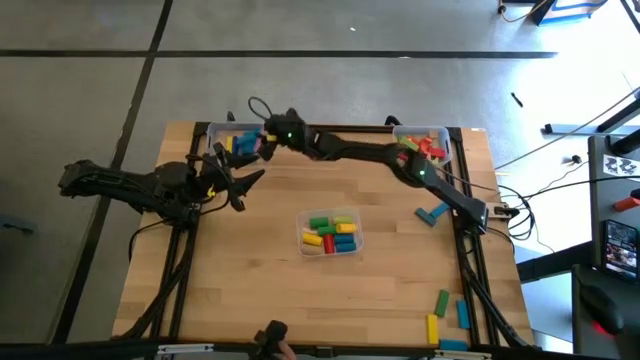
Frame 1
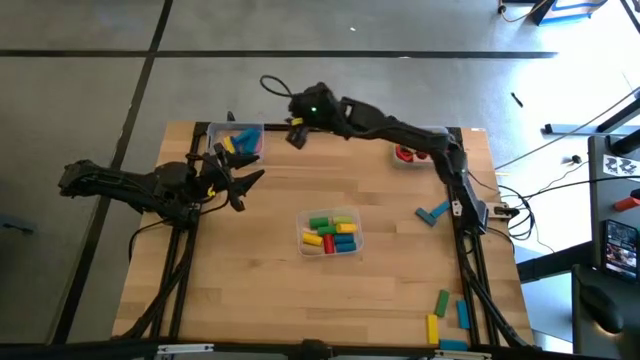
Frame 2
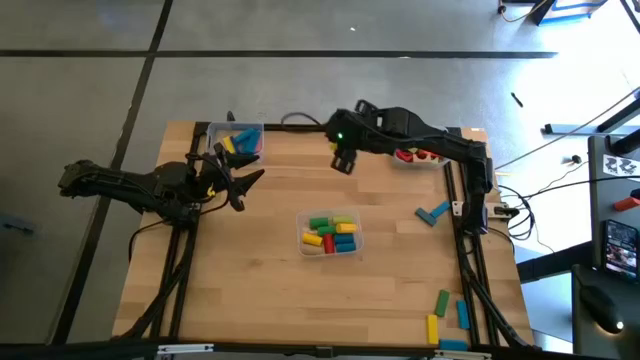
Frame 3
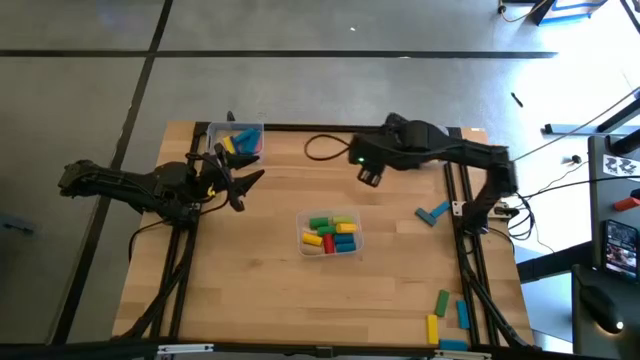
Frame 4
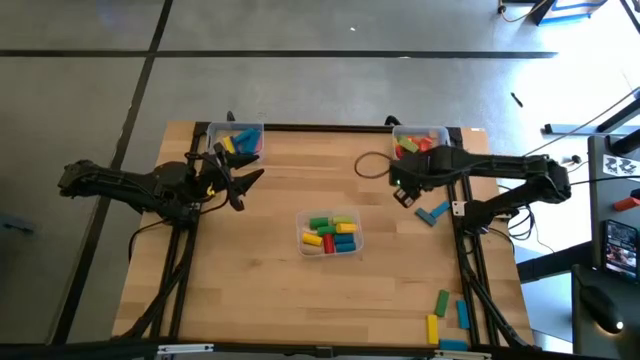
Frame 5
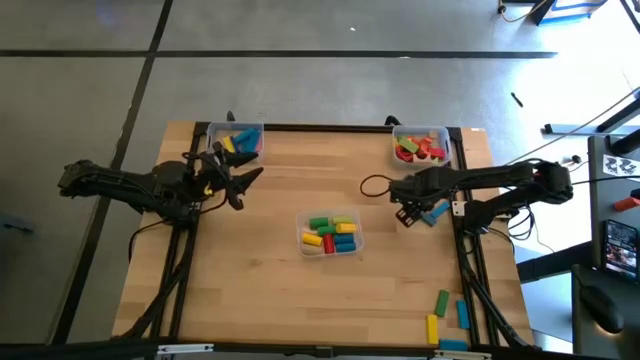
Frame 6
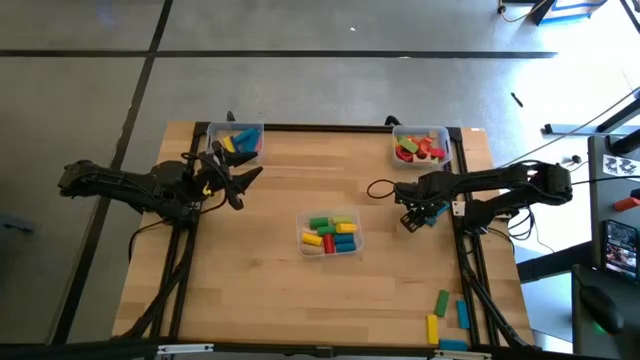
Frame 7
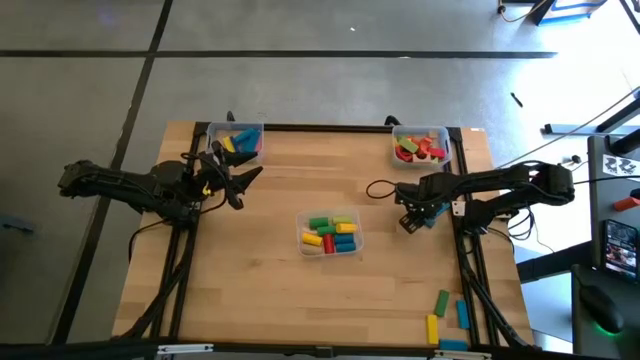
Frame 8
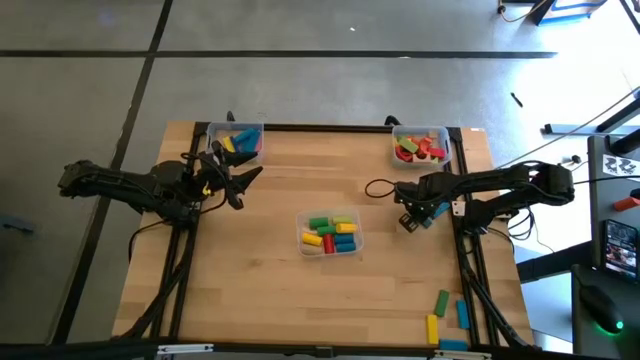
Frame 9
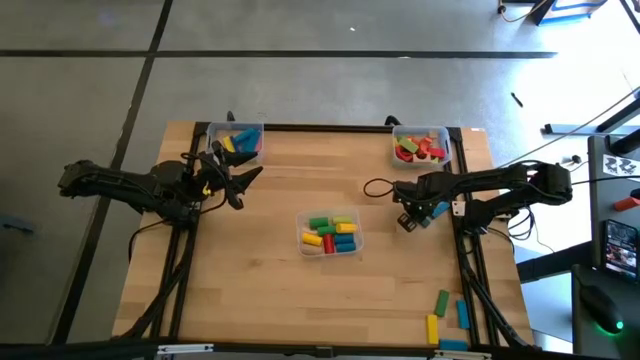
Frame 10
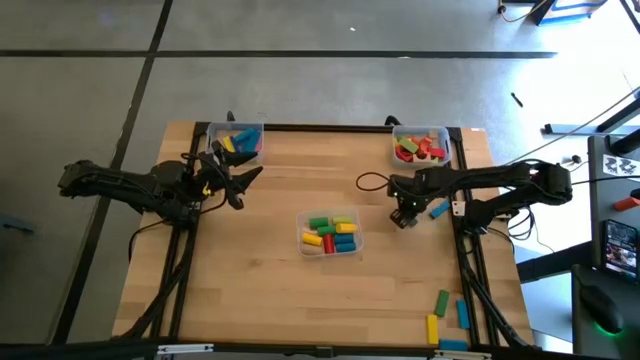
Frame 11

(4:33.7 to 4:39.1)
Task: Sort blocks by size
Put the blue rectangular block into the top left transparent bin

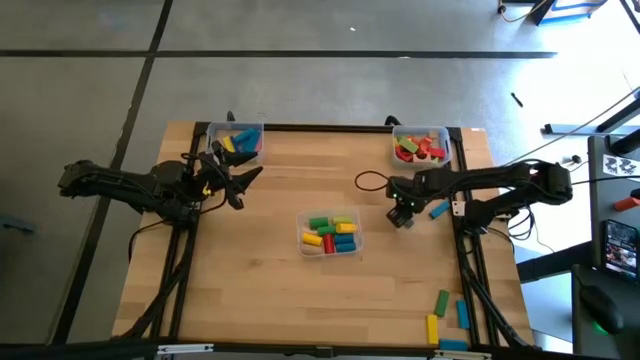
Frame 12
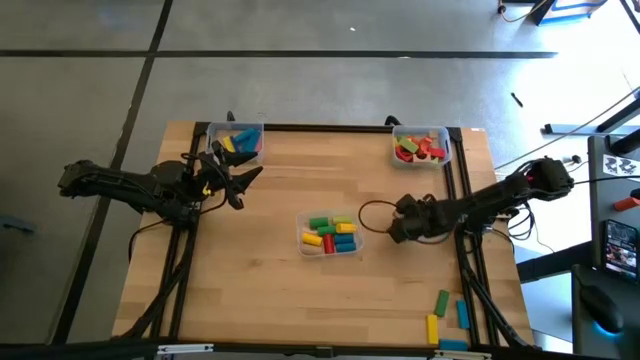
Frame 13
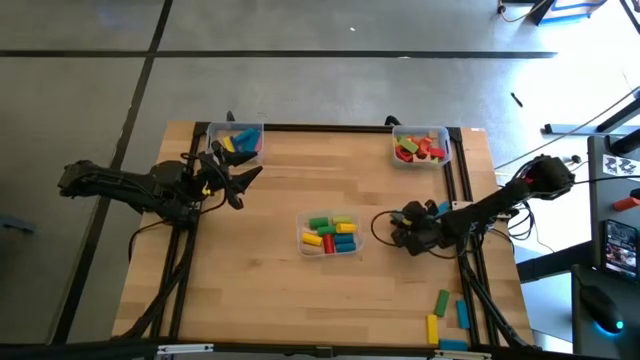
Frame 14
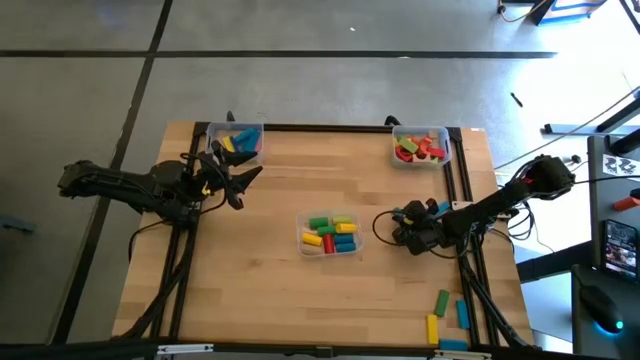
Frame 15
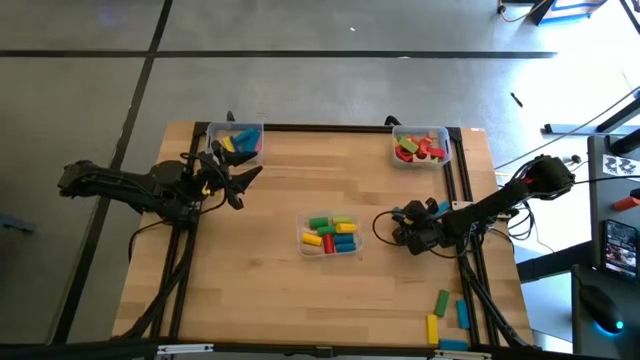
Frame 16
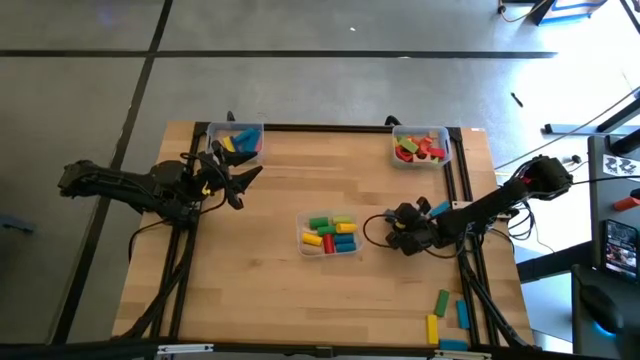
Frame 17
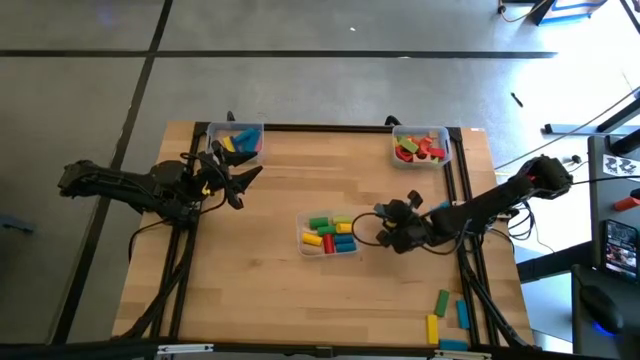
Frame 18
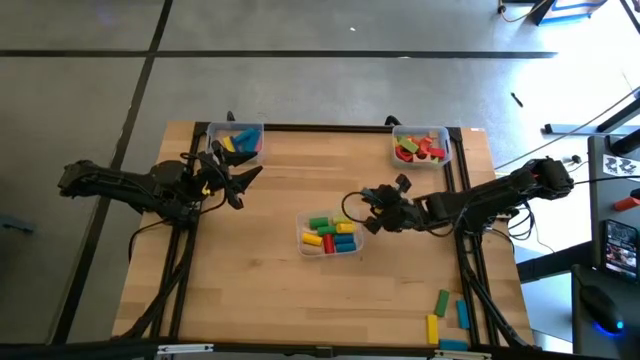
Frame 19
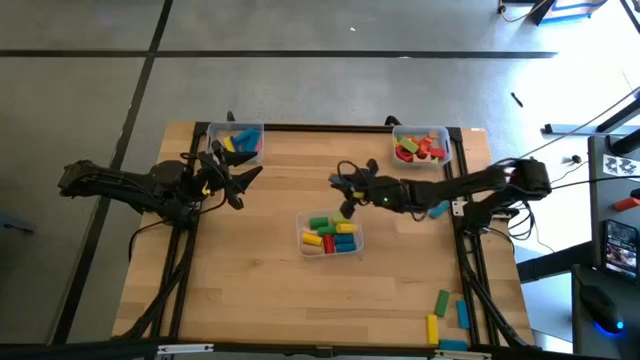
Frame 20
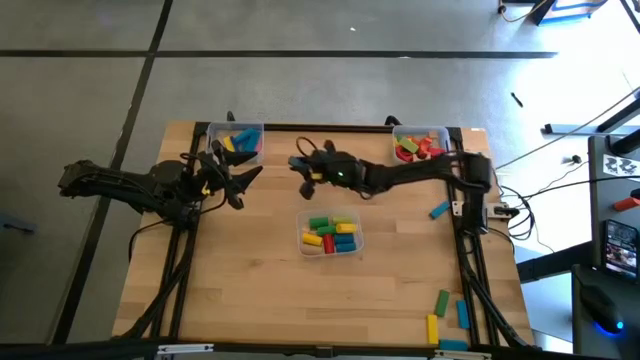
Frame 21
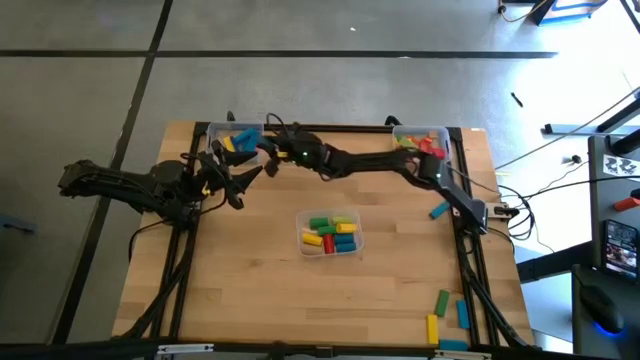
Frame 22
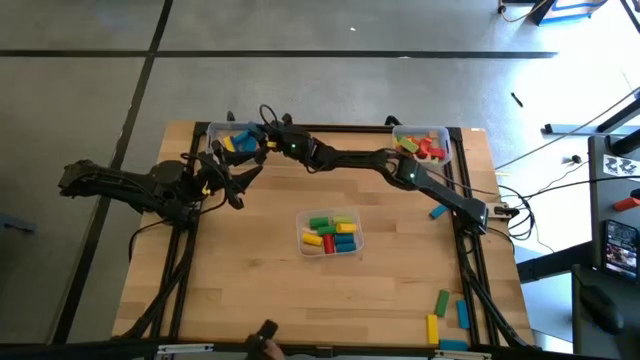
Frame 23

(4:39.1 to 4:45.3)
Put the blue rectangular block into the top left transparent bin

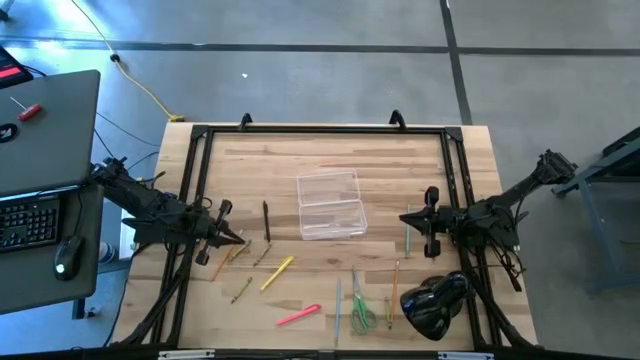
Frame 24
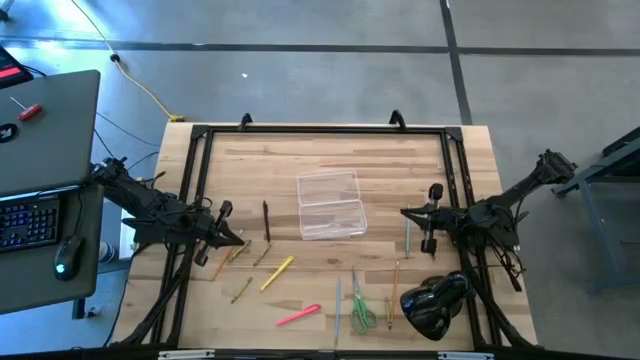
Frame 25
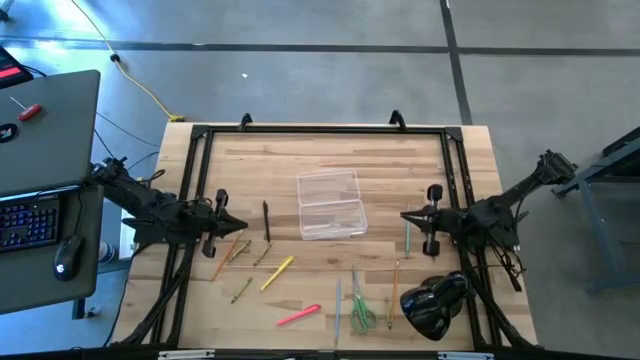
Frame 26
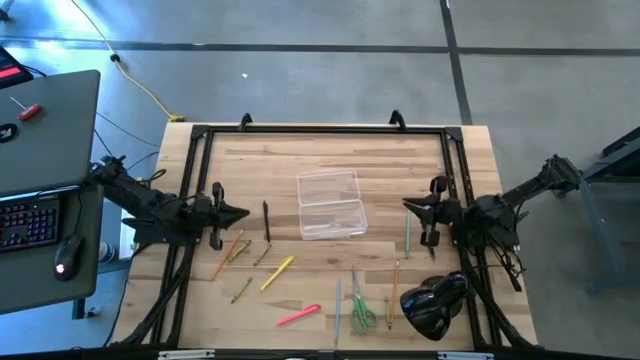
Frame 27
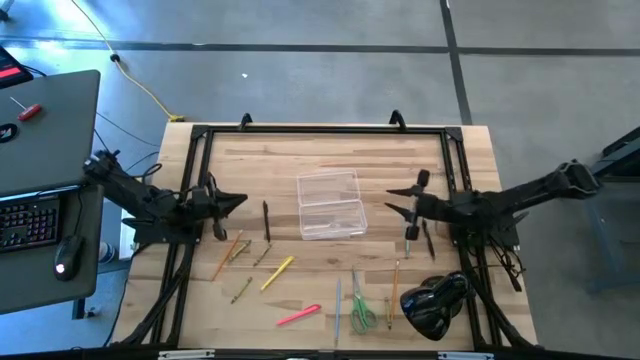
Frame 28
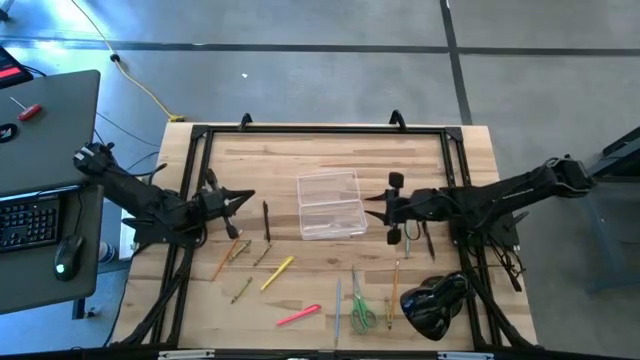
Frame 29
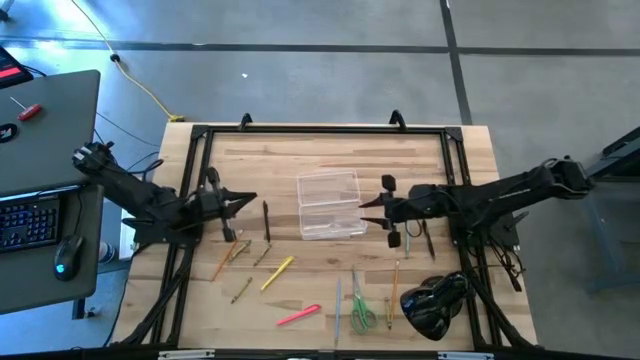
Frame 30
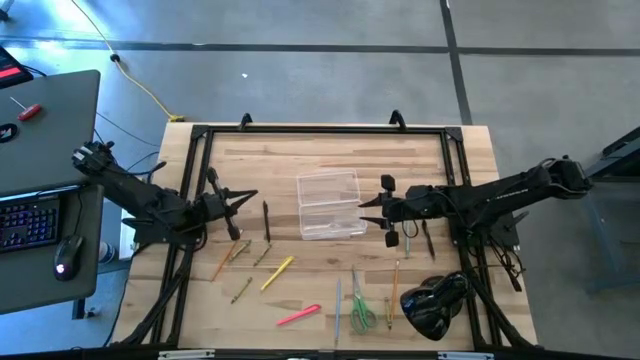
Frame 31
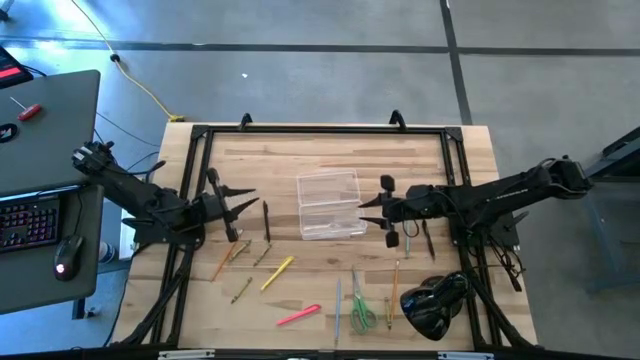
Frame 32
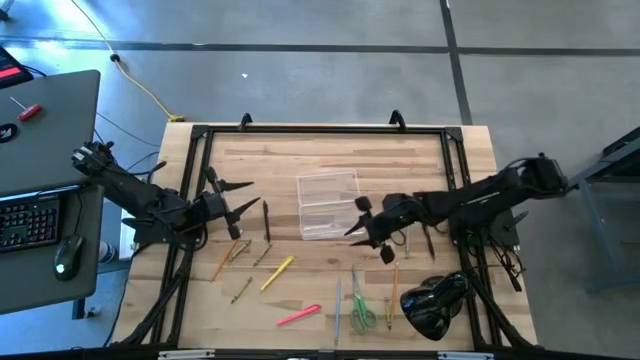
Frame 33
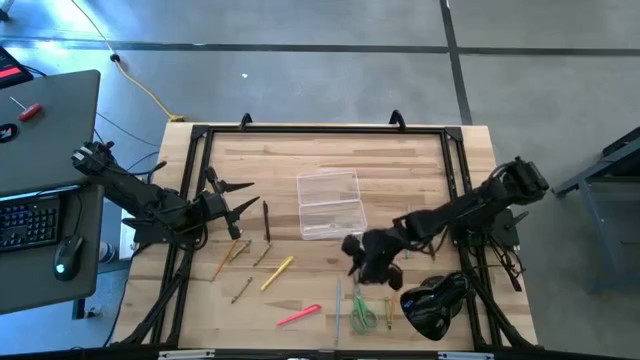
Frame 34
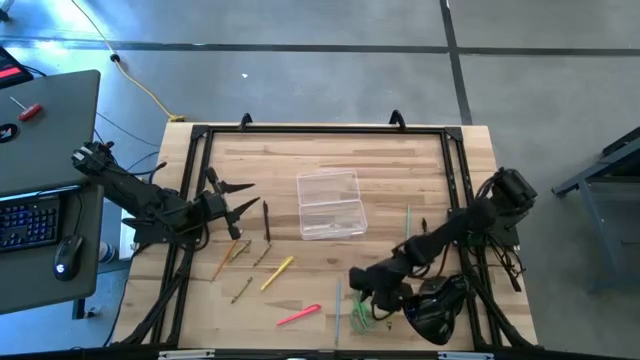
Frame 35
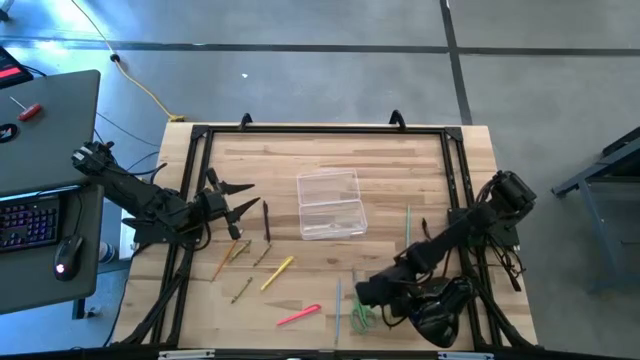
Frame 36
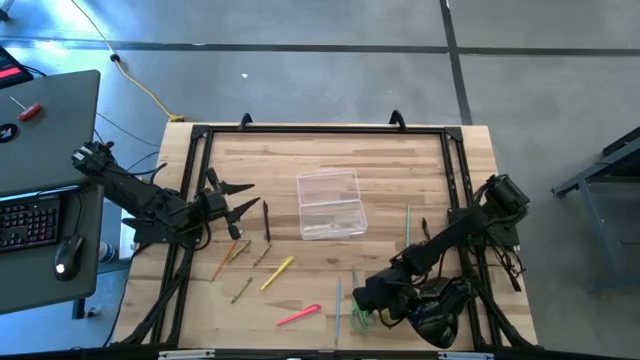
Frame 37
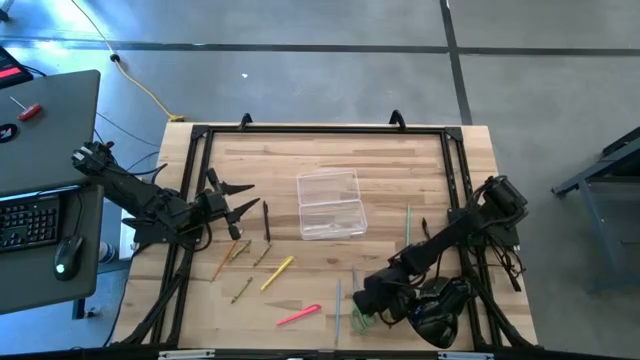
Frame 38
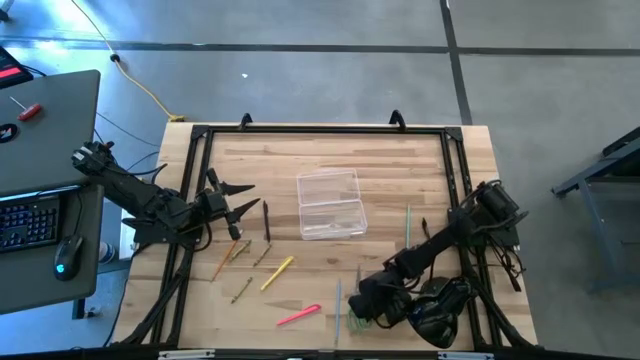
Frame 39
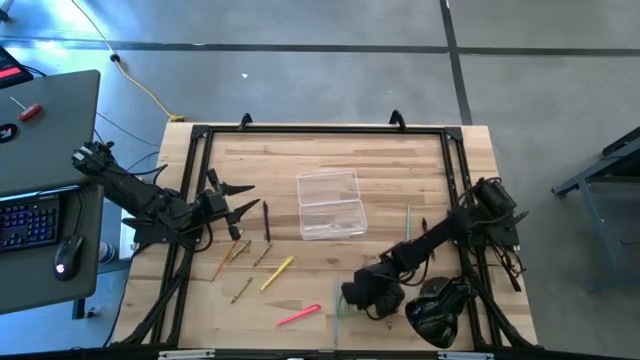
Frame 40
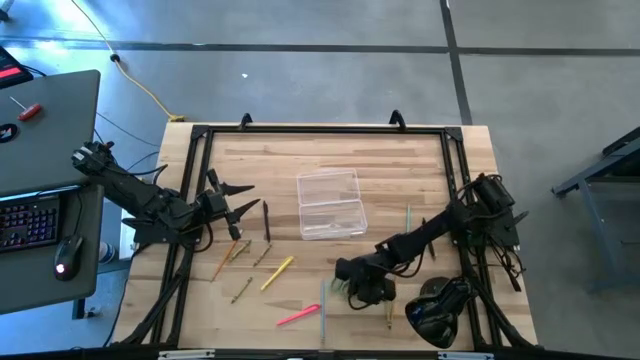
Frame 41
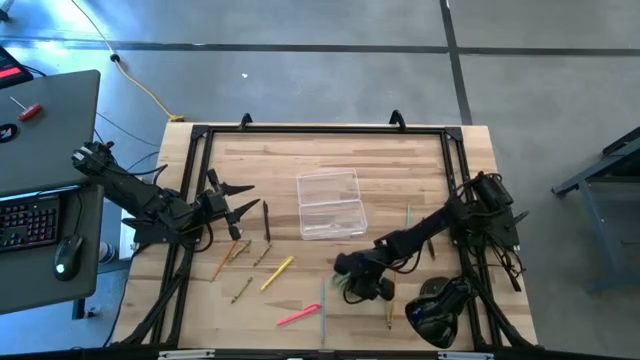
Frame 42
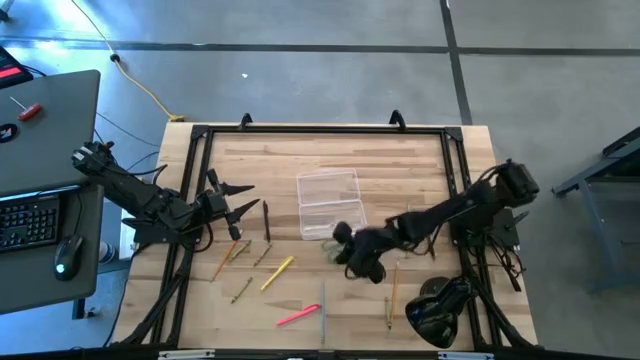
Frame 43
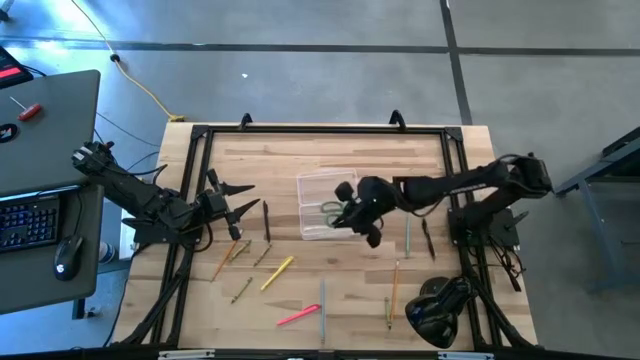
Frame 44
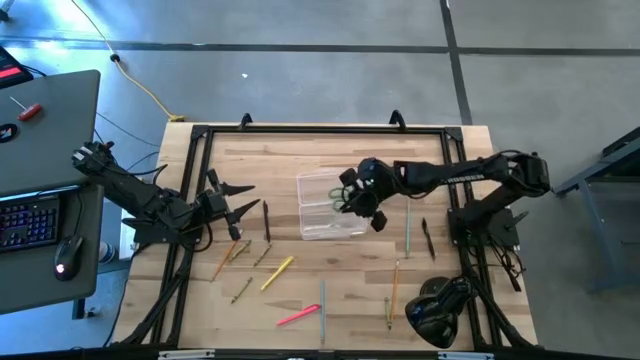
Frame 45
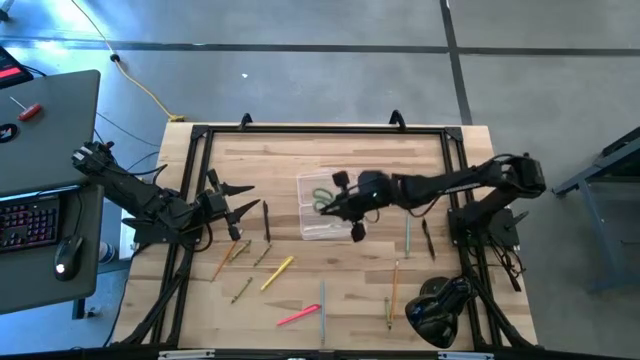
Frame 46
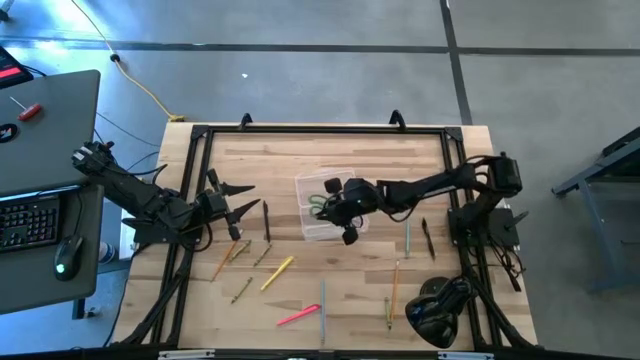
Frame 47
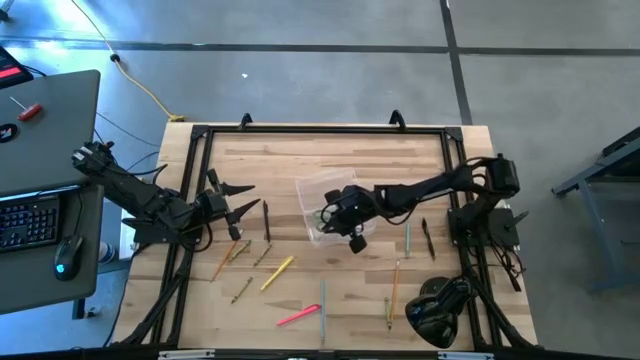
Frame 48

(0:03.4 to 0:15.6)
Task: Pick & place school supplies into a supply box
Put the green scissors into the supply box
